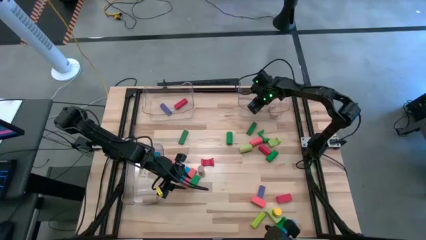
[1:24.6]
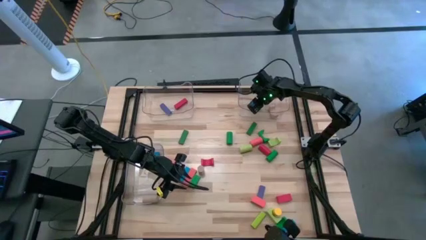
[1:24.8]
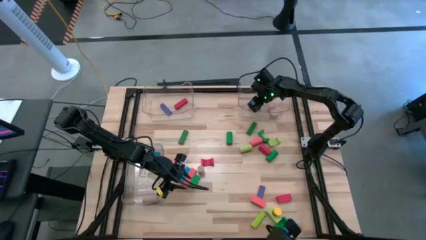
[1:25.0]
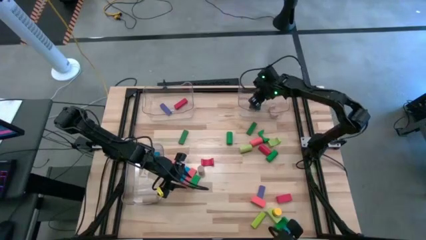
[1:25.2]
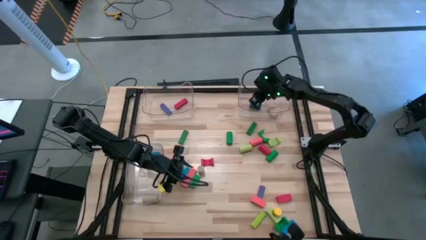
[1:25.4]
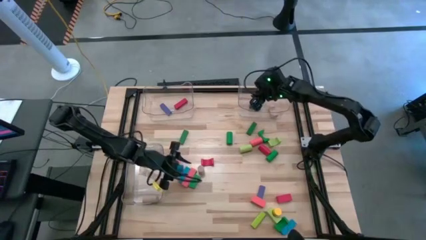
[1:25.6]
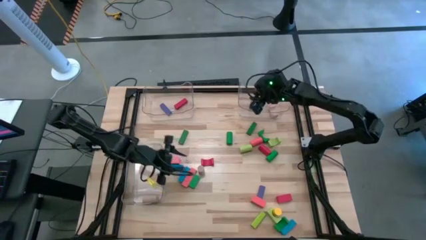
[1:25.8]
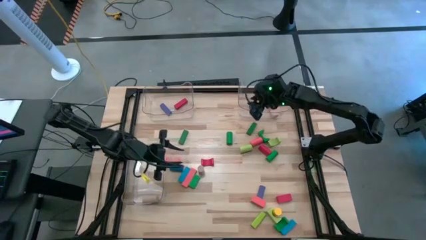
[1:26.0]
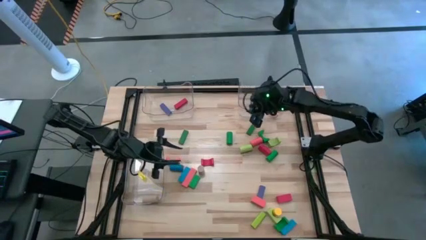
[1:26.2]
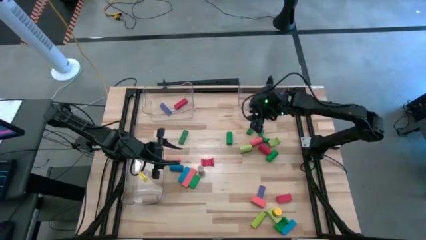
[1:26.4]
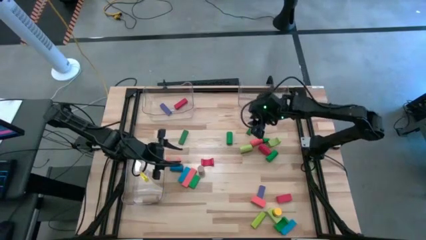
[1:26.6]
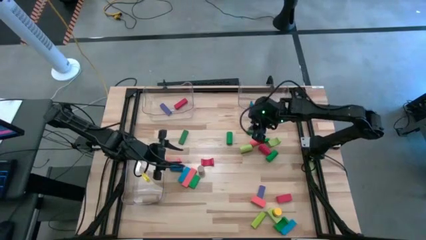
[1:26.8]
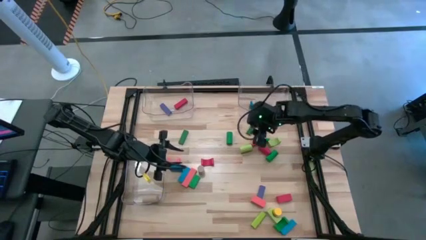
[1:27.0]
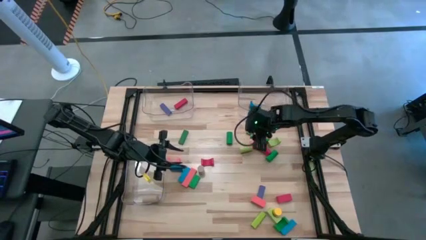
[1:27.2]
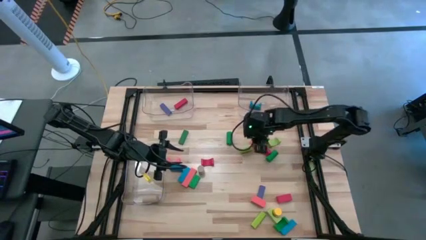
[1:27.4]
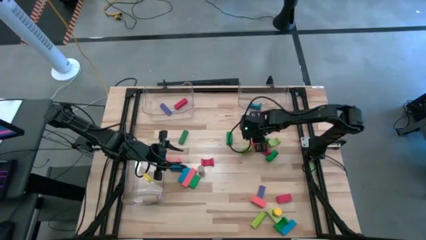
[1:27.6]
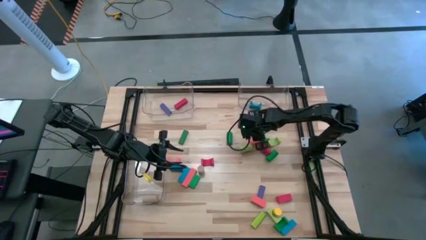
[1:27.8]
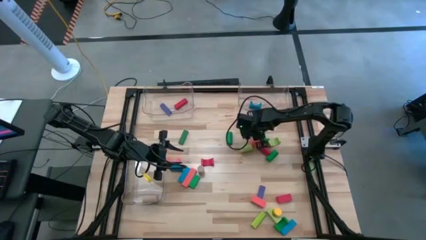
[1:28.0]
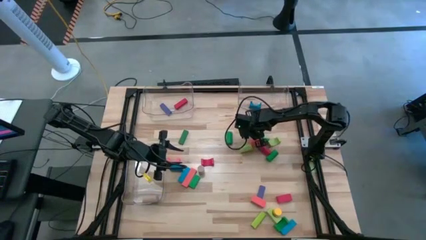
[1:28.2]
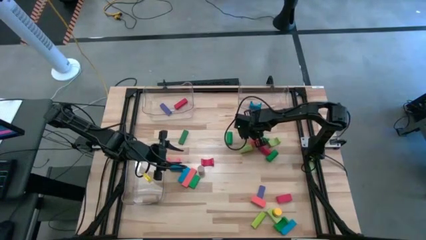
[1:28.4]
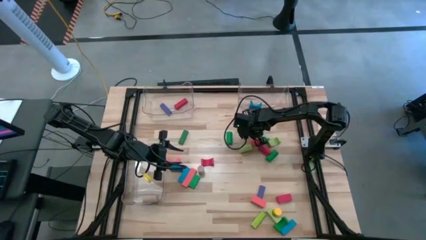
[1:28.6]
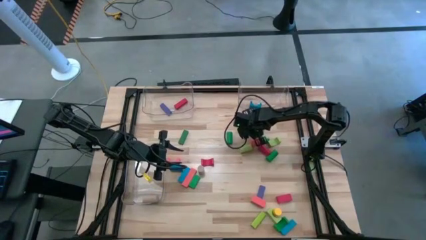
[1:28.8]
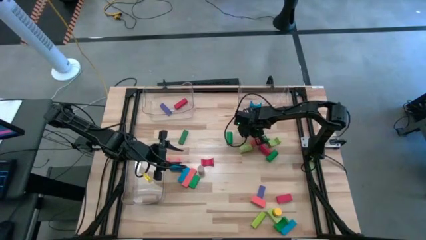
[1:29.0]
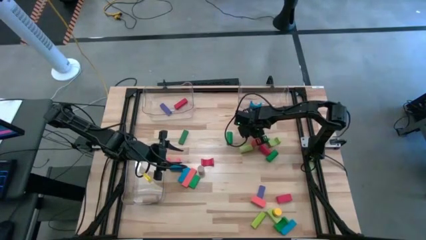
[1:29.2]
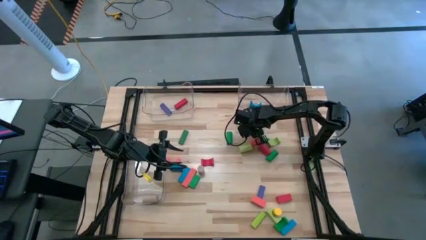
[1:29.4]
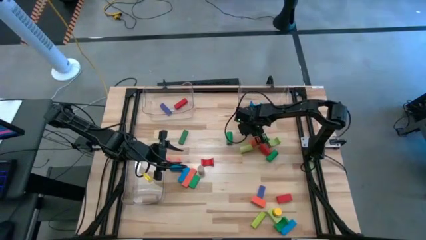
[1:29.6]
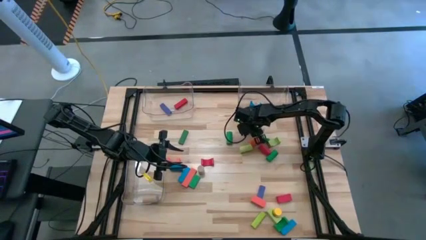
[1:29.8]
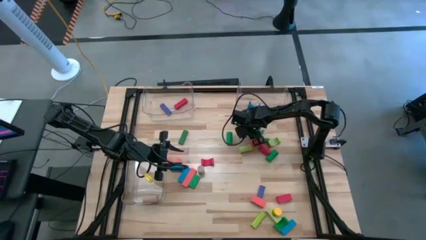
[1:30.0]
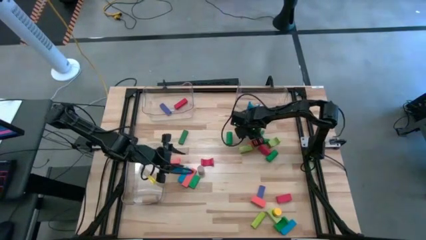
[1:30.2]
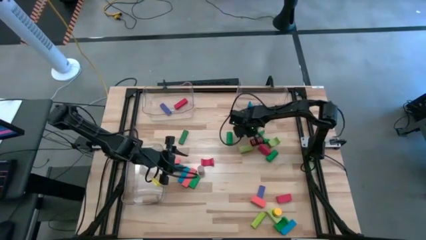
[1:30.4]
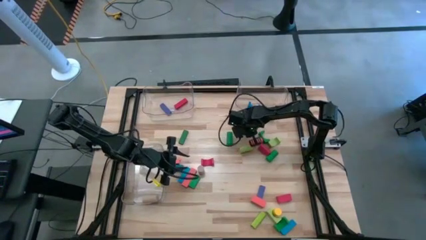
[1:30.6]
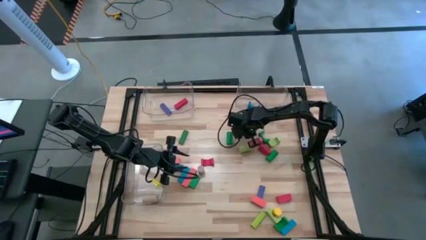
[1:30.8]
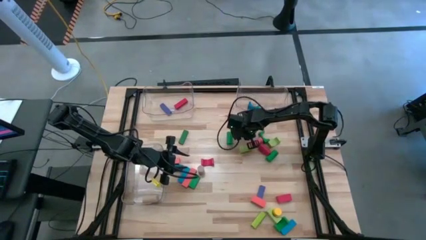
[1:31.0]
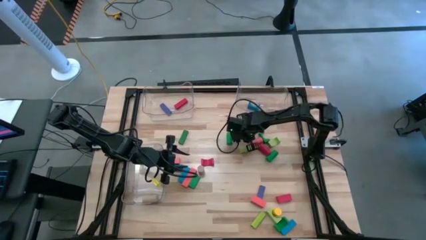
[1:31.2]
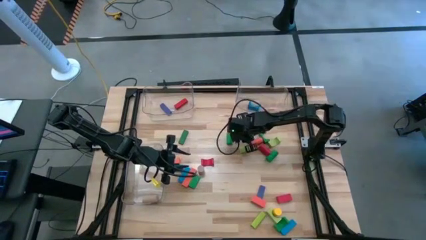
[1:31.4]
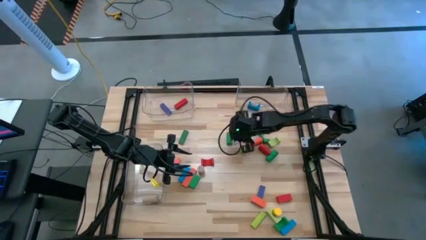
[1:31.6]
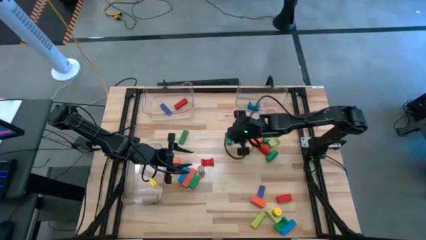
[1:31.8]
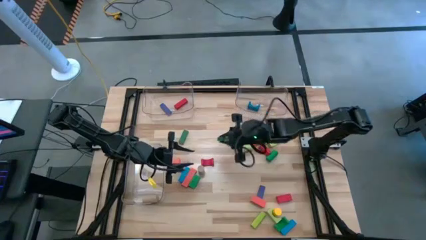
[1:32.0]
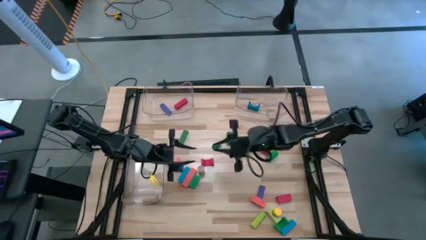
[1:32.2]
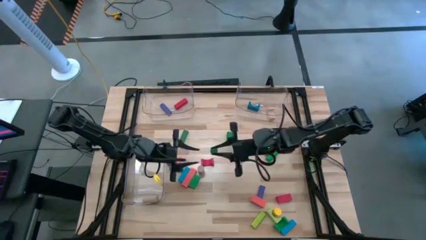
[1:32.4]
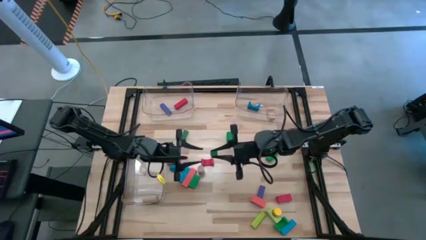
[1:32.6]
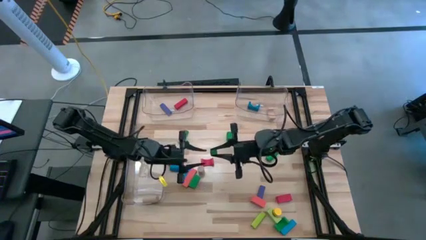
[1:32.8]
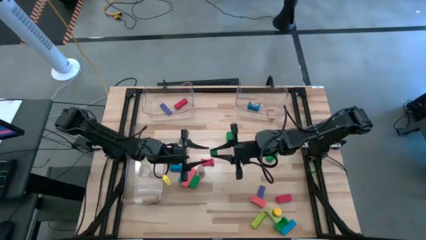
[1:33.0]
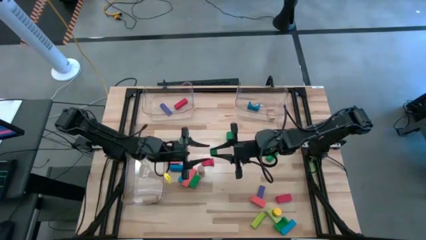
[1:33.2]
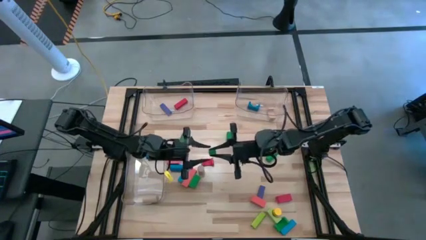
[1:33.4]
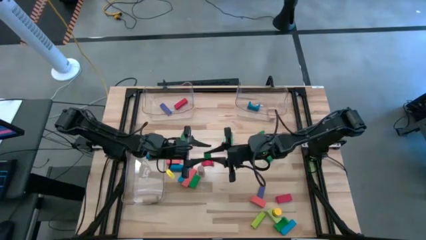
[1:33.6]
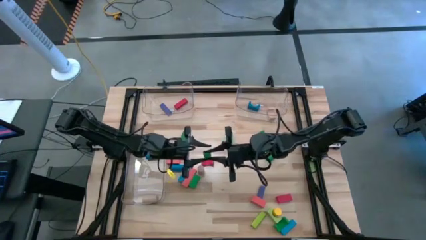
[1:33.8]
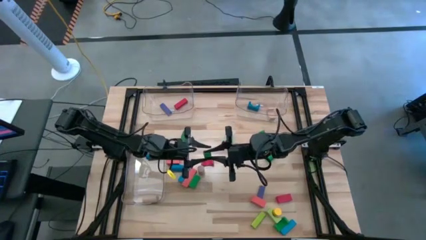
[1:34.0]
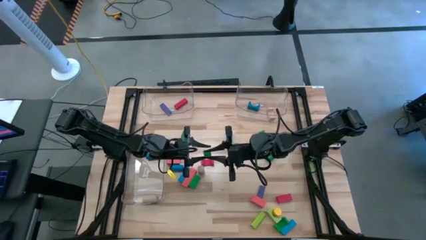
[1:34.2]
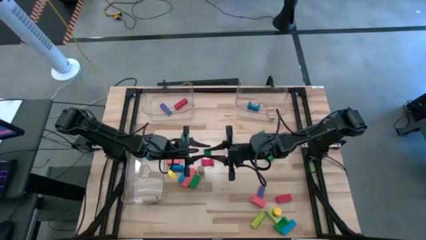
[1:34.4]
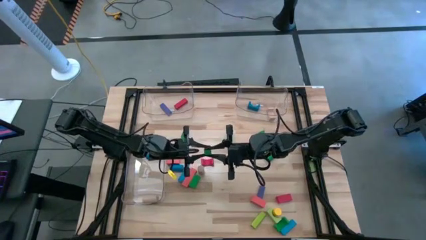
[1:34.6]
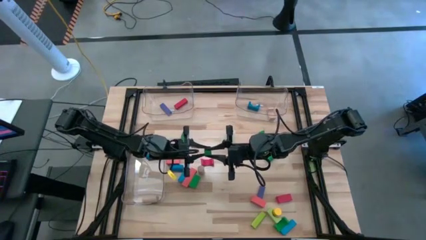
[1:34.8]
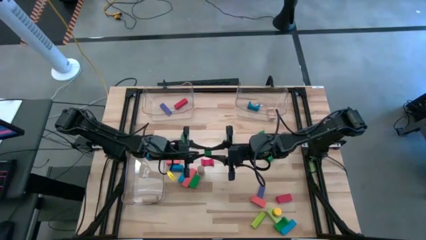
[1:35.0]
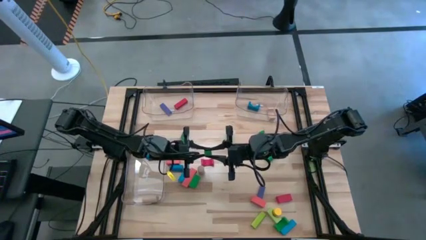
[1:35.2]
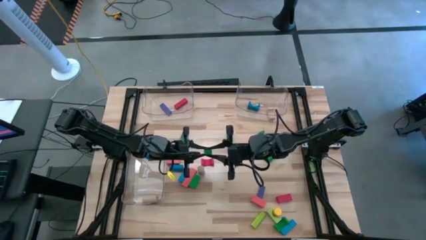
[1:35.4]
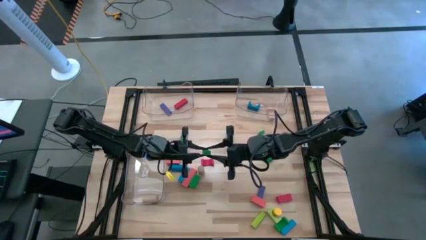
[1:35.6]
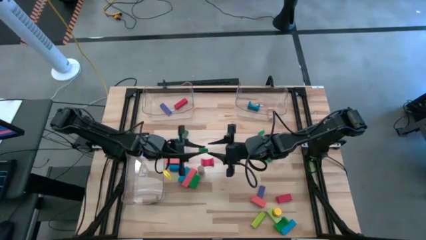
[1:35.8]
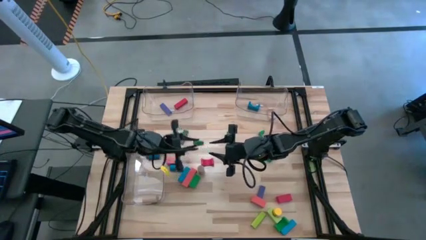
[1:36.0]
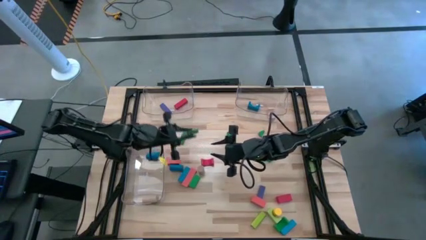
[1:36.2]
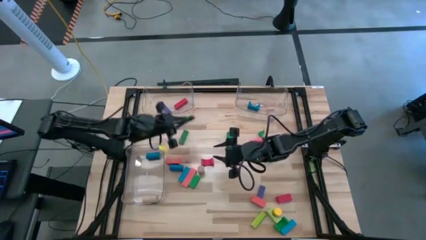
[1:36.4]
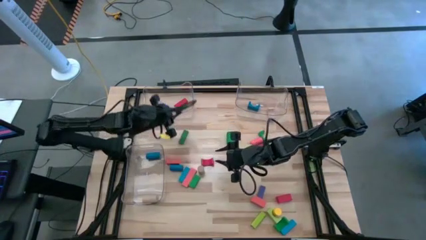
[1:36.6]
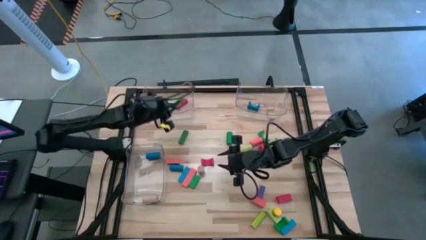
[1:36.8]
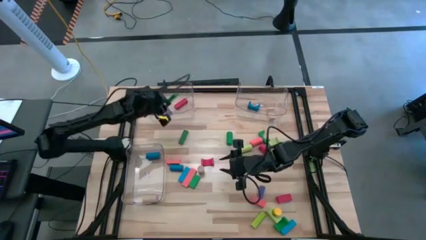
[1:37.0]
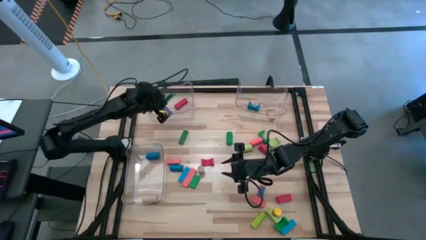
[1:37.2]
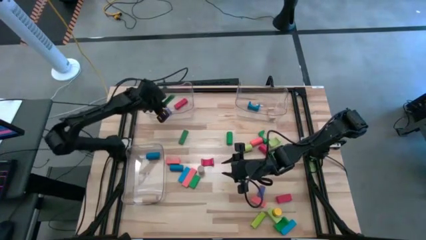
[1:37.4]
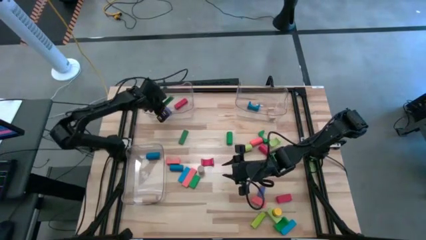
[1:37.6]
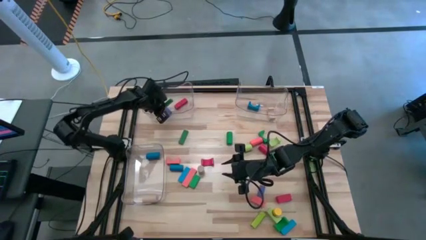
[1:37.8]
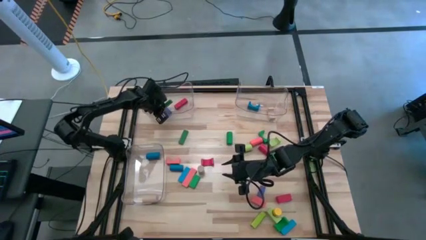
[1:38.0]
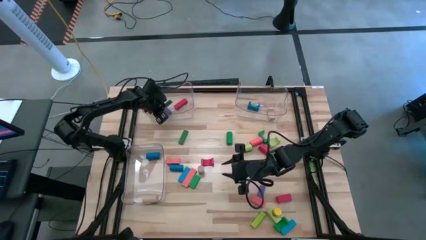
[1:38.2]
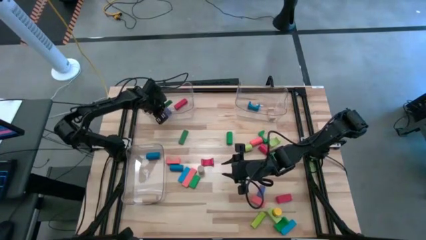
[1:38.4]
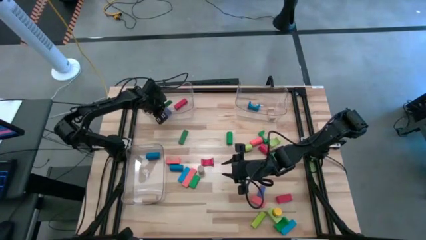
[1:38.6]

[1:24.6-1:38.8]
Task: Sort blocks by size
Put the green rectangular block into the top left transparent bin

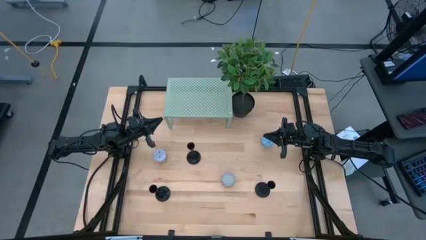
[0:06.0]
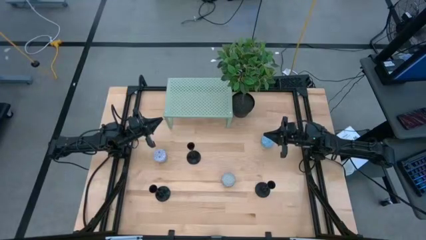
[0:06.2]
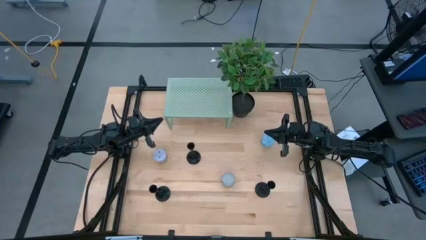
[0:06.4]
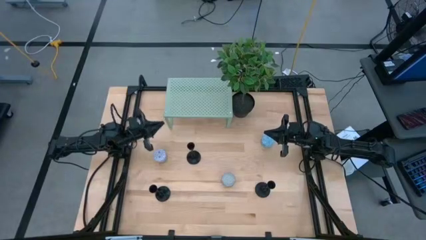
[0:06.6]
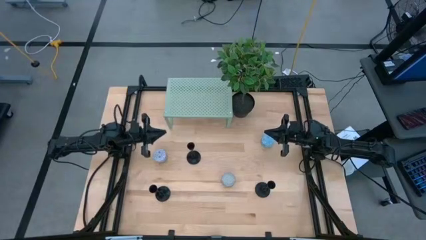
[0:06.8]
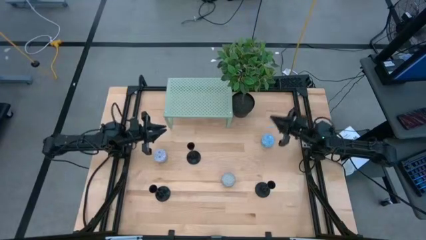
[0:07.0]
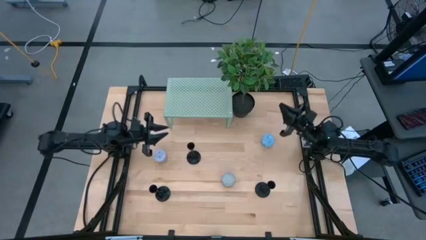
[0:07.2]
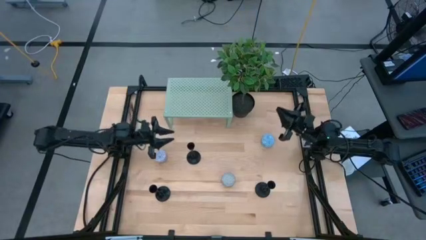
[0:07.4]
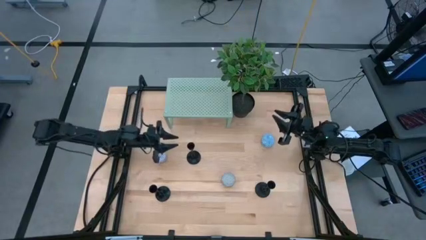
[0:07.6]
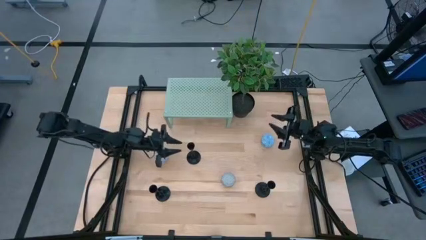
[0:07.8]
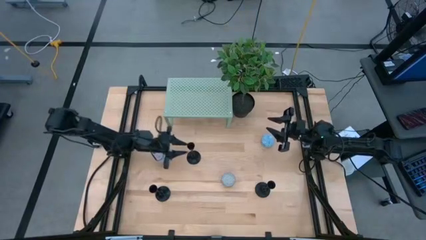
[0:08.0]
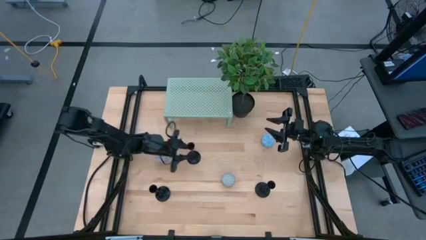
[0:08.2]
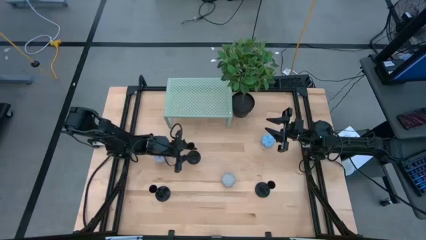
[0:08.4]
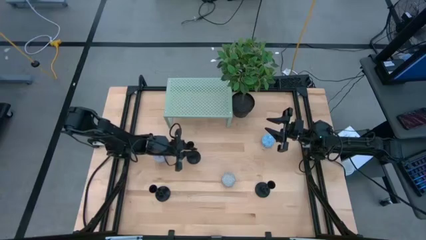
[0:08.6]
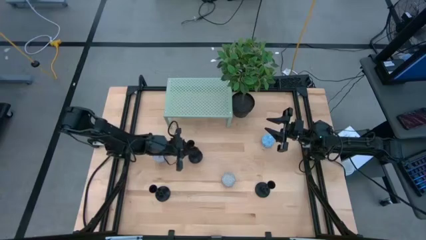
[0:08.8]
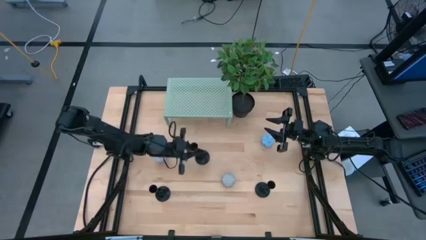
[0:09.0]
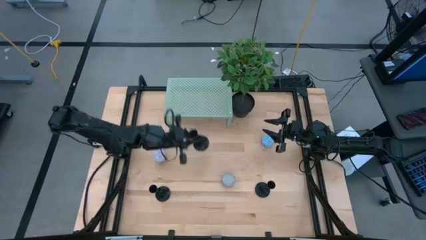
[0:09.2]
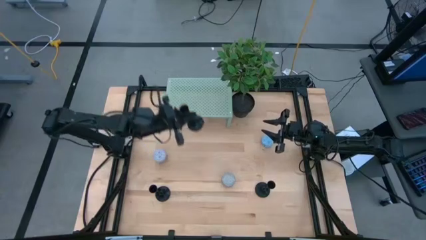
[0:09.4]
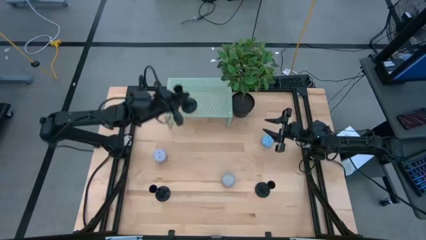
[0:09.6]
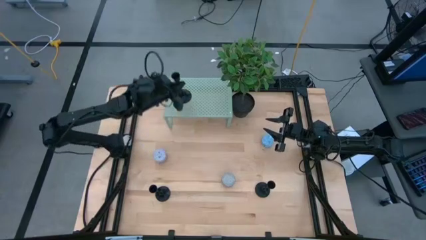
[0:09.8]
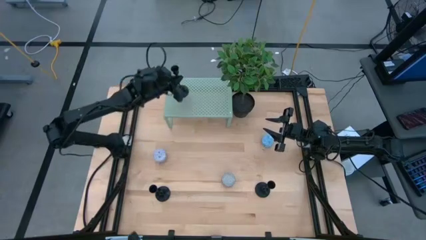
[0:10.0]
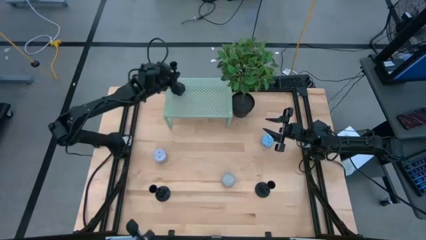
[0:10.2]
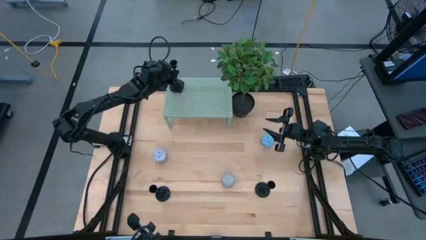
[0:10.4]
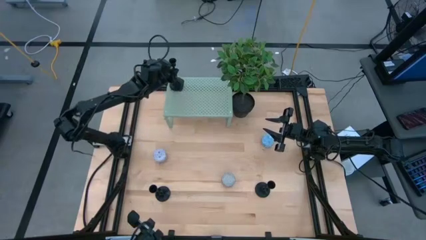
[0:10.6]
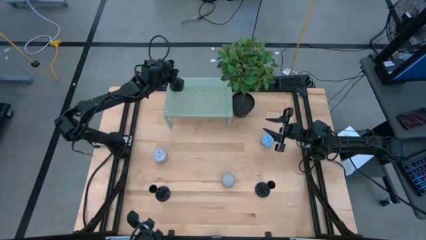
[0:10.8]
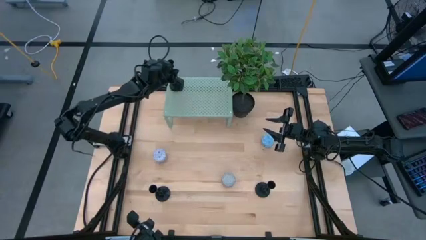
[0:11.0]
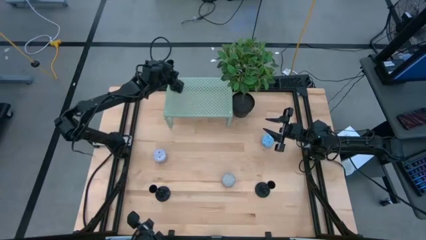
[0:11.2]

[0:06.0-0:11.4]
Task: Pick & Place candle stick holders
Put the top left black candle holder on the shelf
